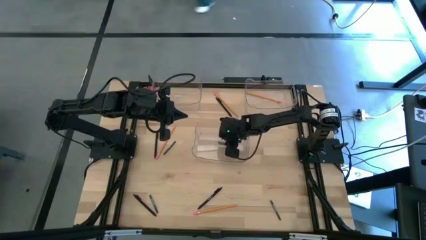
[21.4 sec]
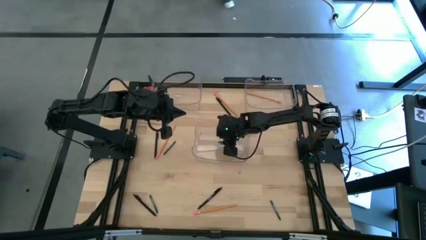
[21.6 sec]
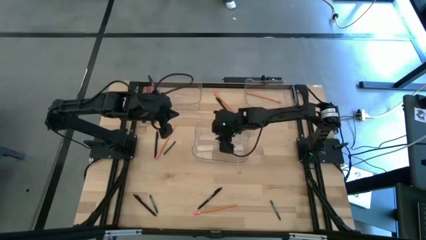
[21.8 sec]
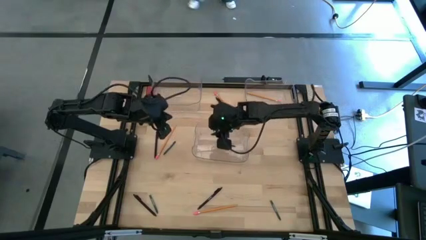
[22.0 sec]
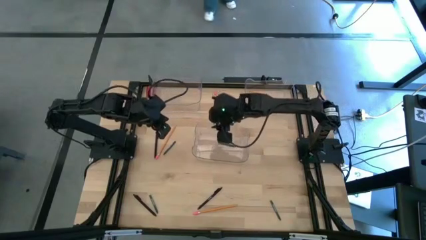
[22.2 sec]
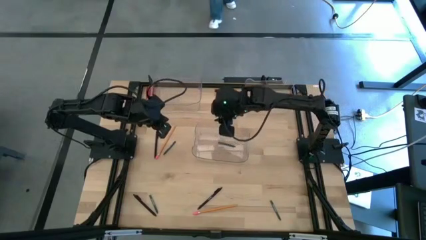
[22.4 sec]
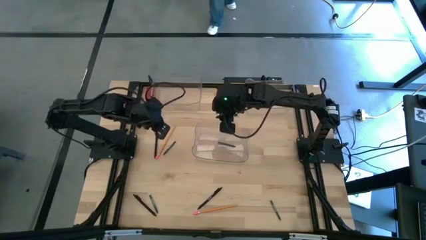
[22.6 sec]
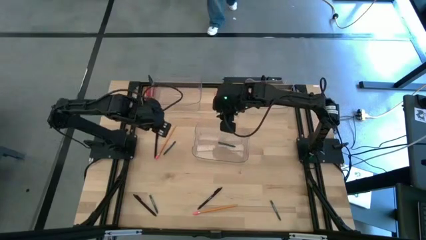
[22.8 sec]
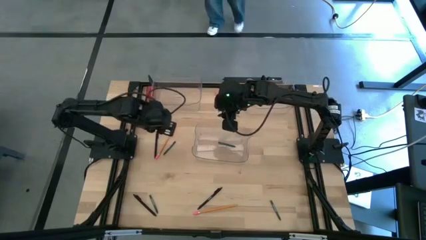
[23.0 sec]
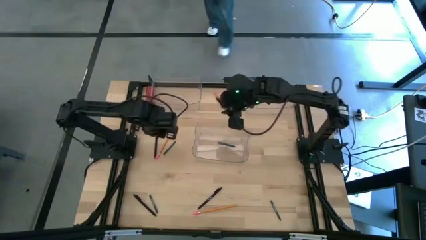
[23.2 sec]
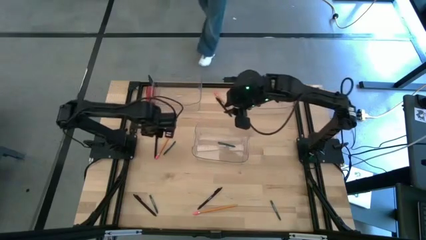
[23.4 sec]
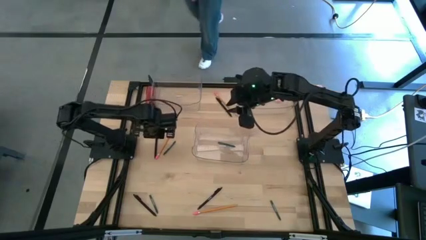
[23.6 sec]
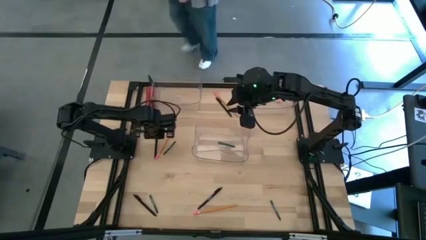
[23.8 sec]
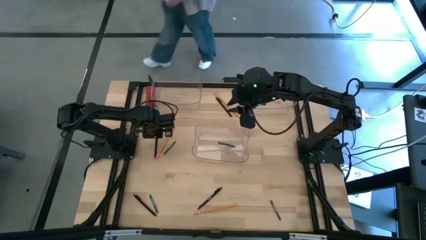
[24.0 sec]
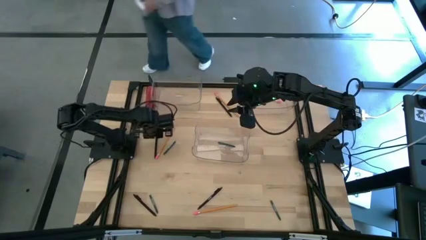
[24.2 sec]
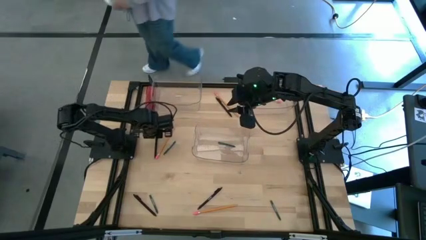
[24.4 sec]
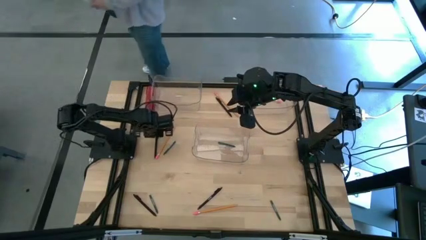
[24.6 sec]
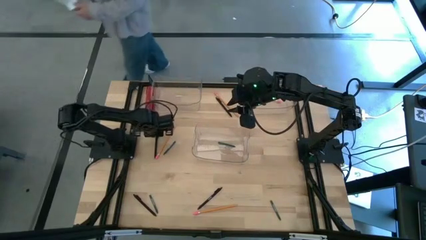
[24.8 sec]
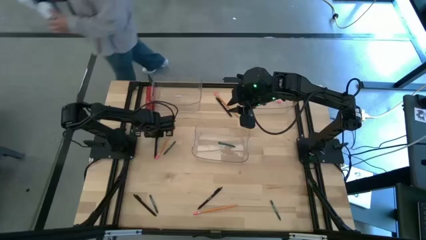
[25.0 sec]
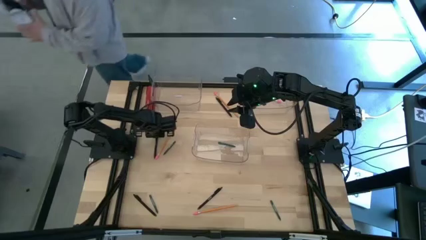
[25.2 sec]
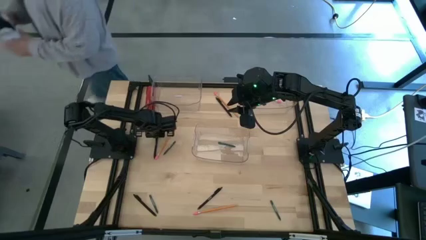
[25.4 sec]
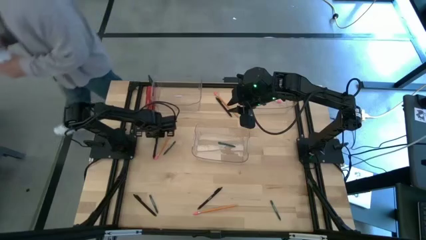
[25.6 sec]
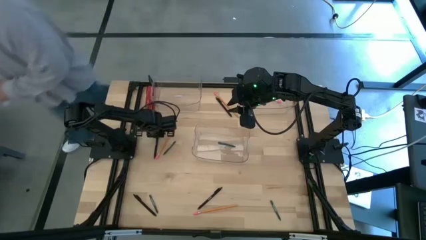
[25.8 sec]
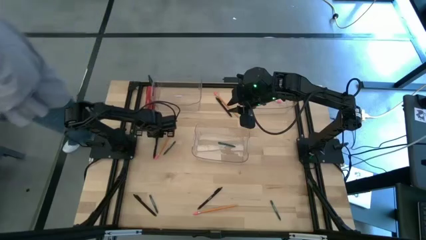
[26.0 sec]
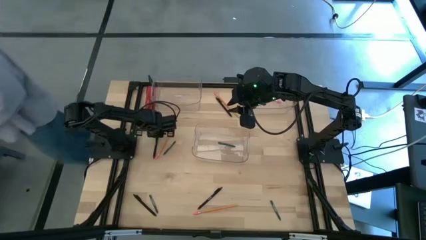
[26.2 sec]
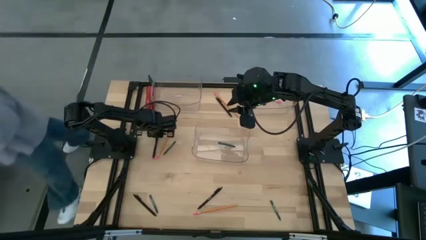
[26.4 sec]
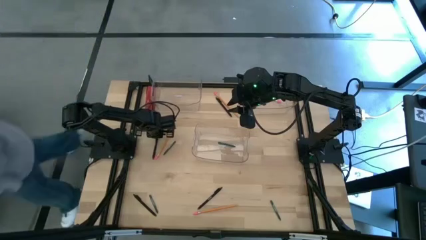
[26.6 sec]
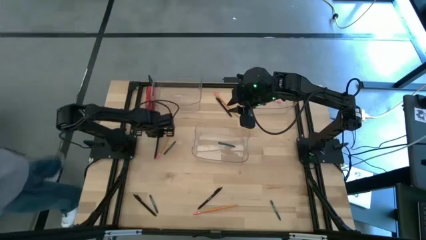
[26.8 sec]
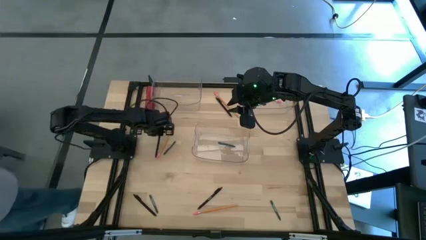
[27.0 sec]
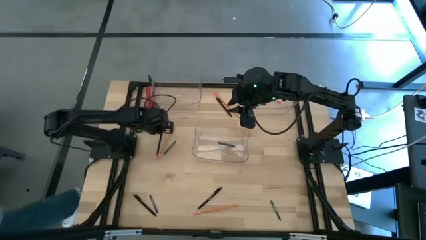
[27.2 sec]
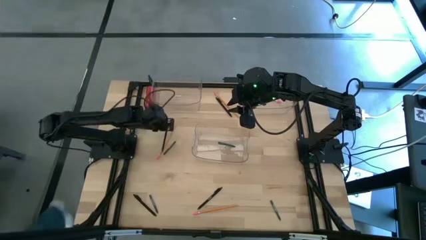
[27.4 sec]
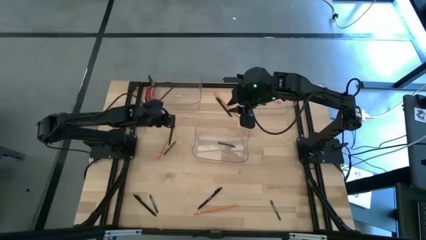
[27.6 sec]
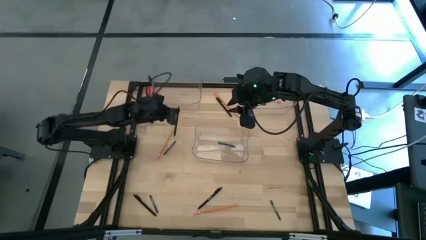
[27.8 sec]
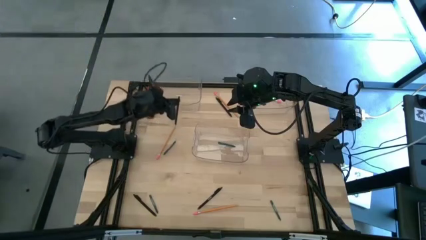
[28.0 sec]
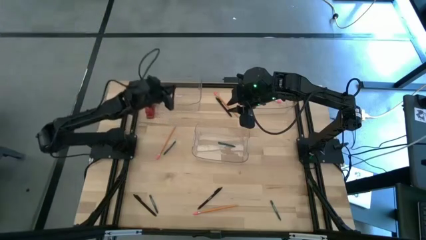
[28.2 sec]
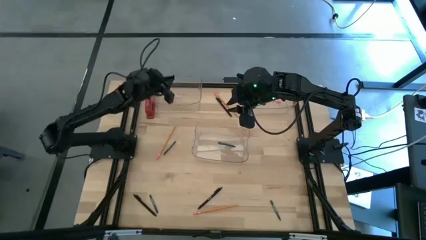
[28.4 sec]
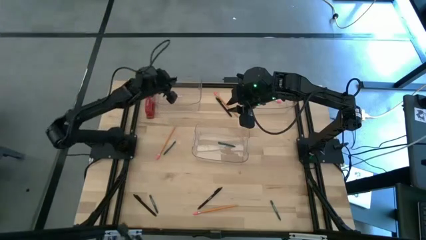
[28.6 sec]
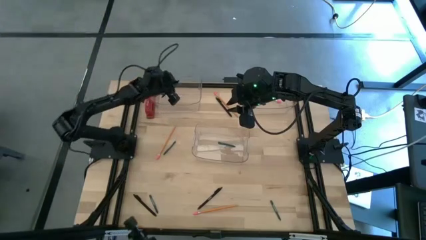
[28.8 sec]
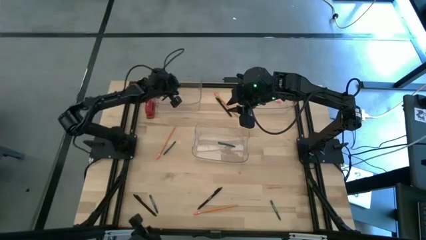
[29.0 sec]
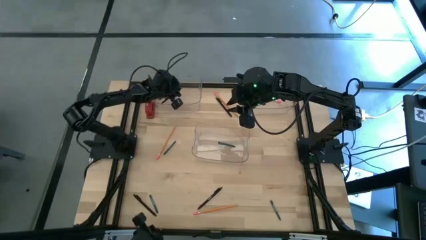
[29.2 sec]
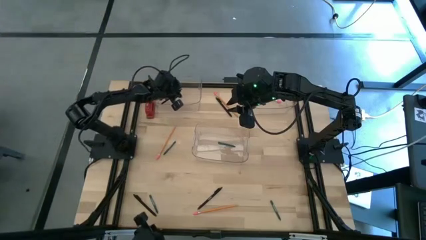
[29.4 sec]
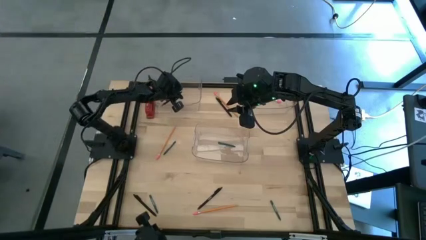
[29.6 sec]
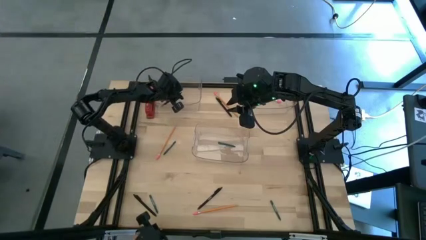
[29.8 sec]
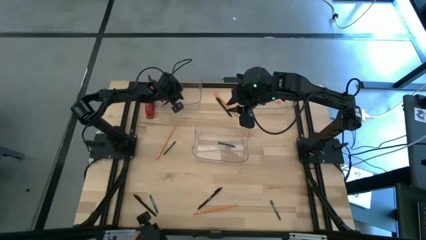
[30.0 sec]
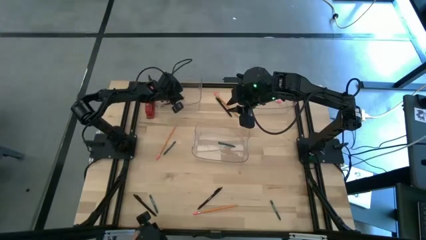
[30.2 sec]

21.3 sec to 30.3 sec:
Task: Sort crayons/erasers/pens/pencils in bins
Put the black pen into the top left transparent bin

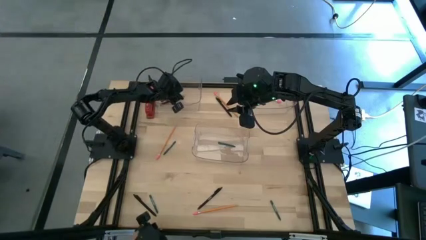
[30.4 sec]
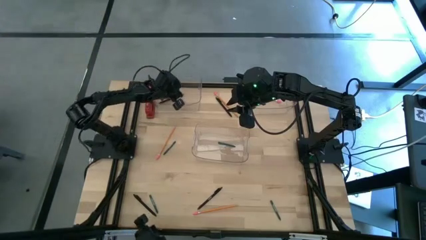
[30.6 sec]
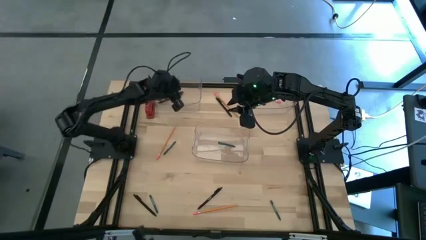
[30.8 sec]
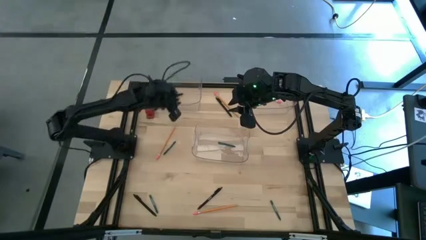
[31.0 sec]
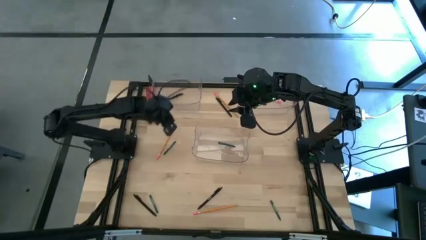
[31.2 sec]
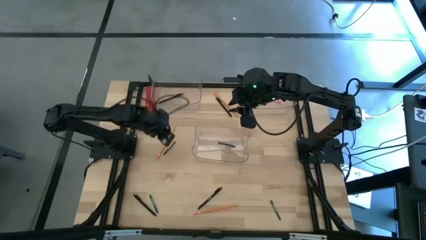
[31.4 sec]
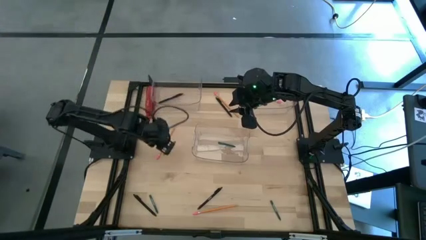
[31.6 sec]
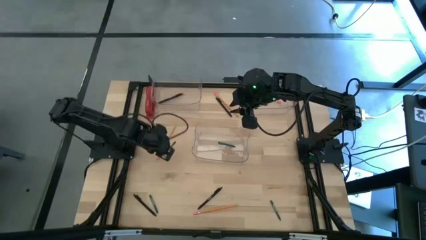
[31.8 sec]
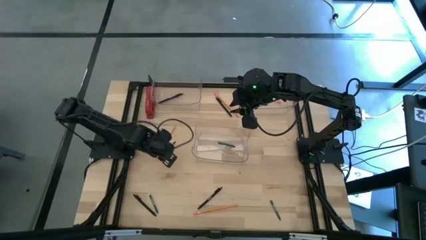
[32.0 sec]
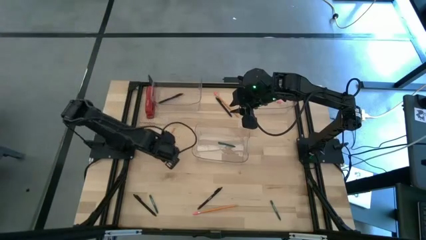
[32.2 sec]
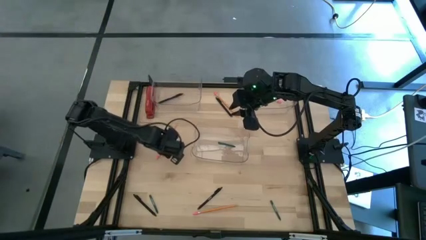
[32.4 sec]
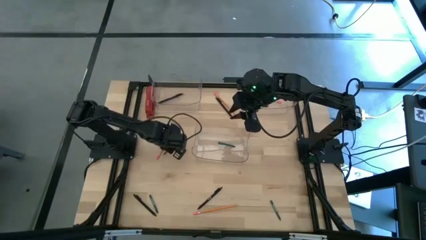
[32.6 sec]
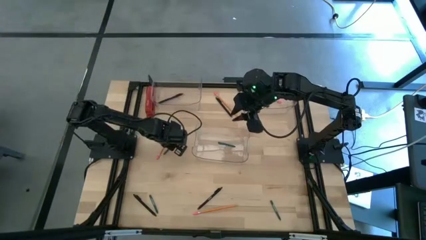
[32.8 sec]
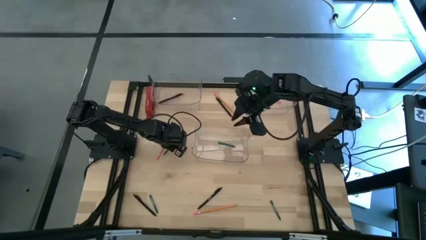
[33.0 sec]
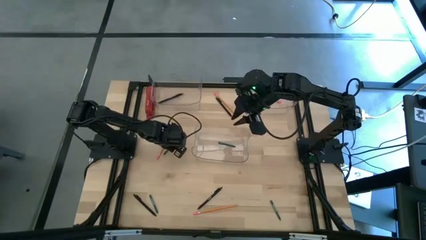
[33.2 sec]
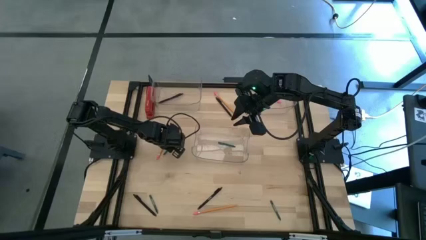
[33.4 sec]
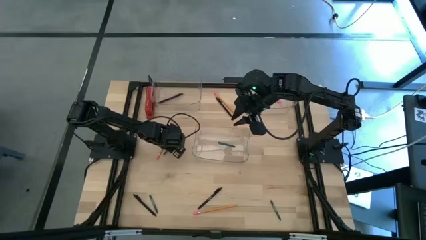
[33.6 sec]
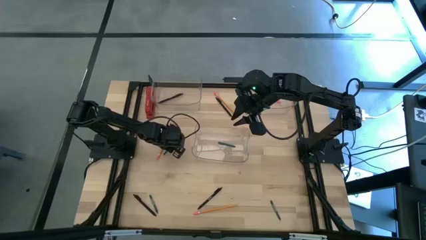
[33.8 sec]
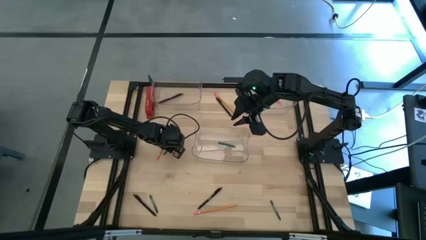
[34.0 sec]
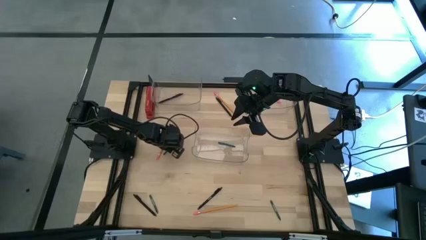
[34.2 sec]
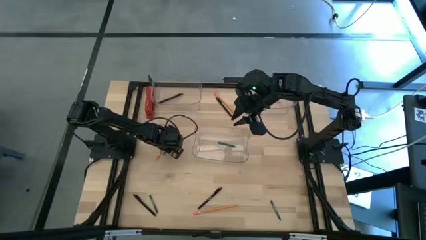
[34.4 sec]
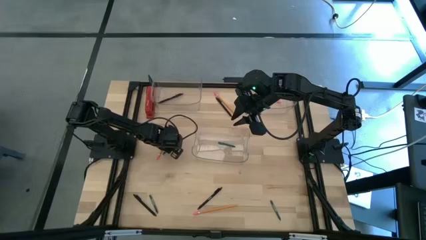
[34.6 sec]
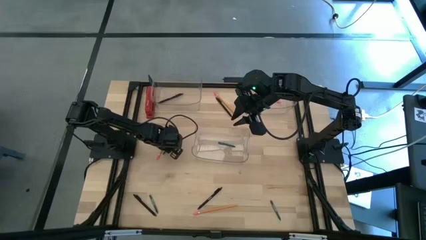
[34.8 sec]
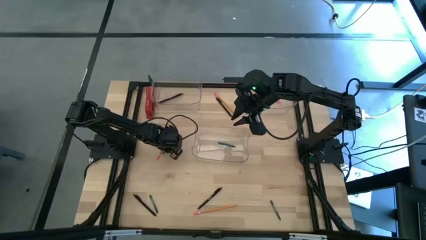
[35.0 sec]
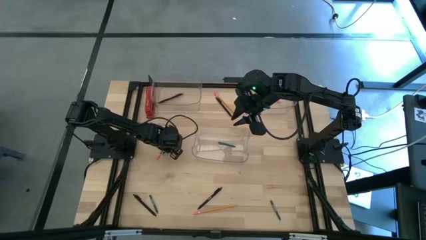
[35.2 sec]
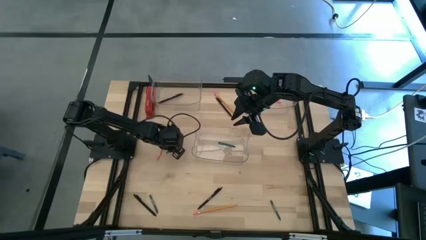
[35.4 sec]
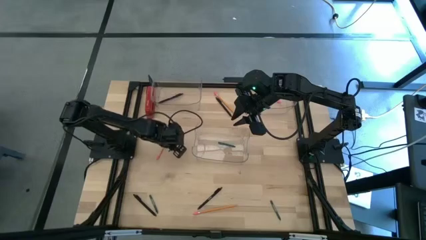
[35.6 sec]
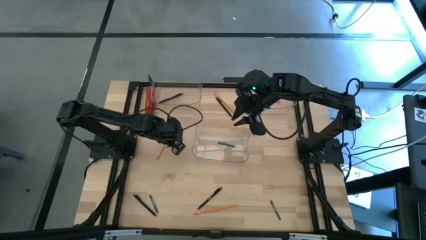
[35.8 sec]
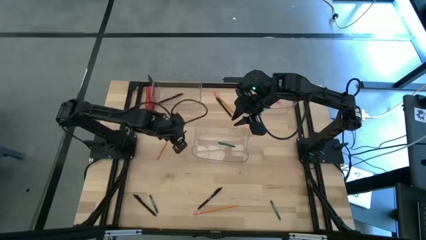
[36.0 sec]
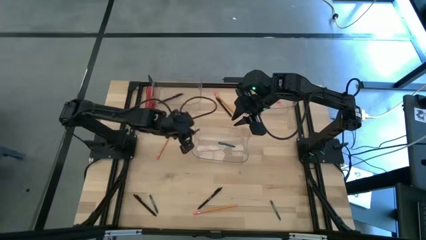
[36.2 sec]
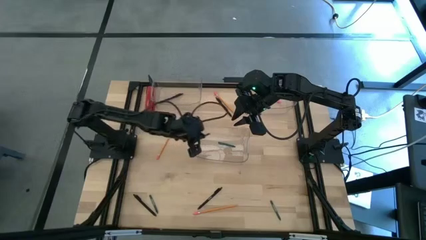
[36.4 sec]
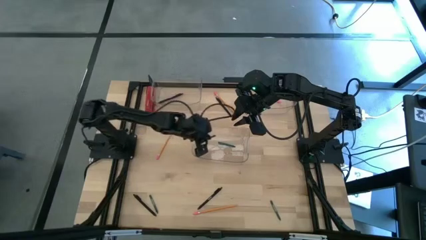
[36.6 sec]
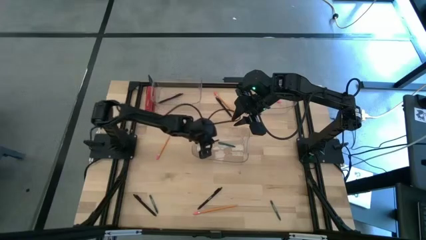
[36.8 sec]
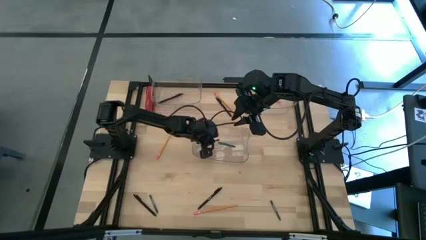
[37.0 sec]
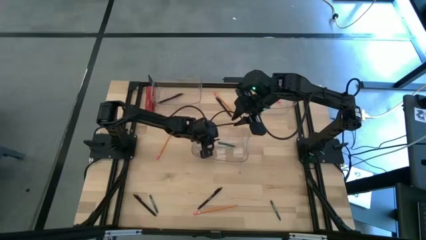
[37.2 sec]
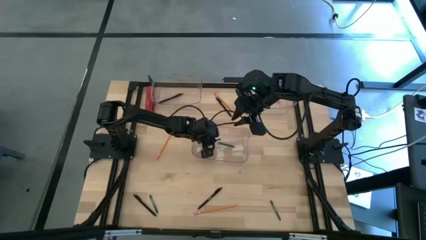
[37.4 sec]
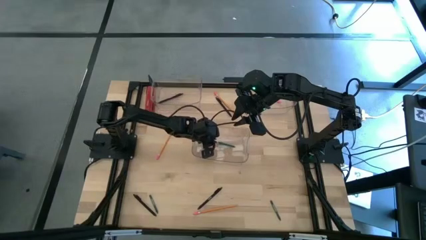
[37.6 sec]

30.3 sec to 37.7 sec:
Put the green crayon into the middle transparent bin

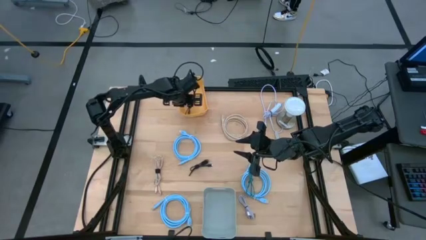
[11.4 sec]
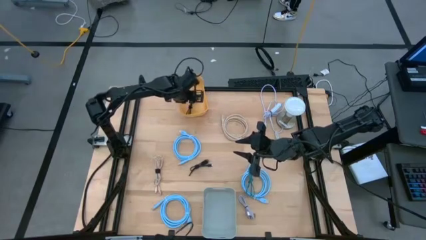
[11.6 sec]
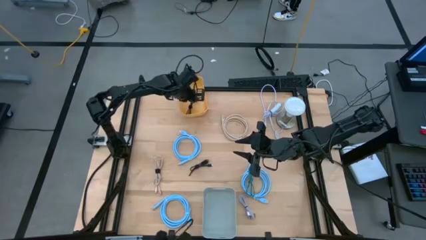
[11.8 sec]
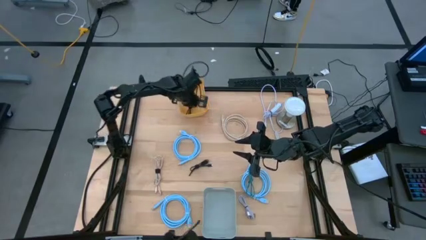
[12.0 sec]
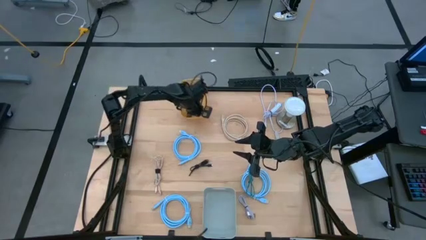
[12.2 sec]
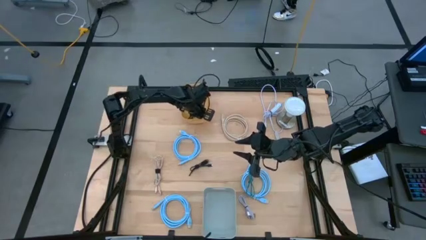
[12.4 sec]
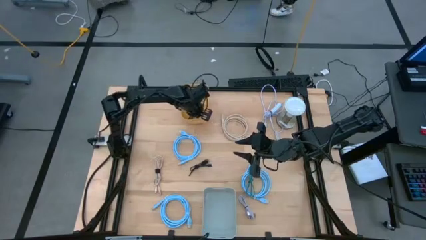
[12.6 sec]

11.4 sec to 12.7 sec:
Task: Pick & Place USB Port
Adjust the yellow bin
